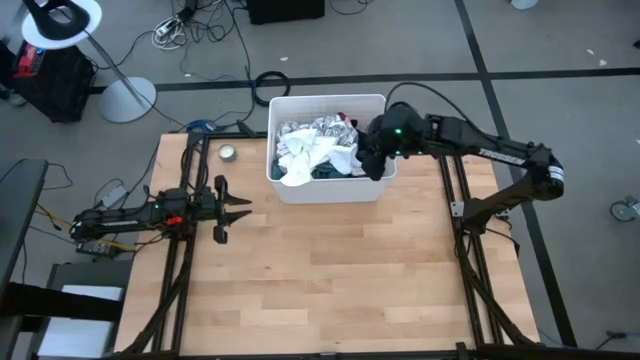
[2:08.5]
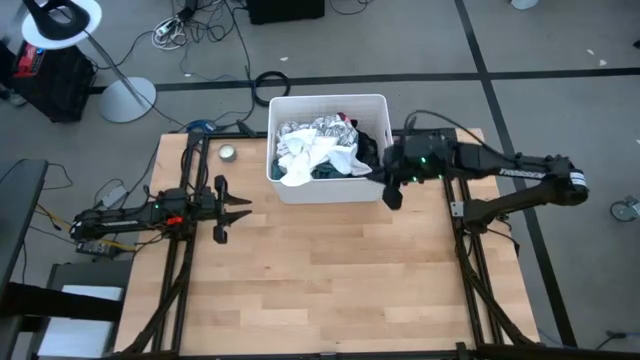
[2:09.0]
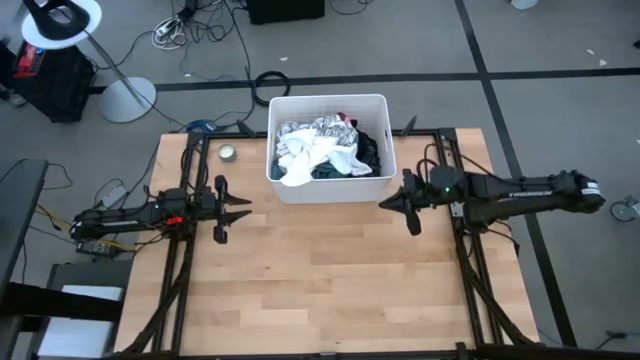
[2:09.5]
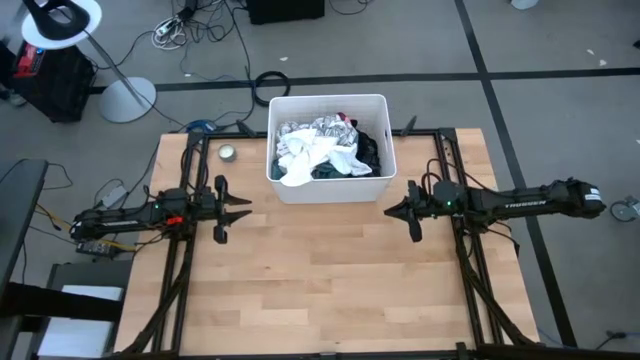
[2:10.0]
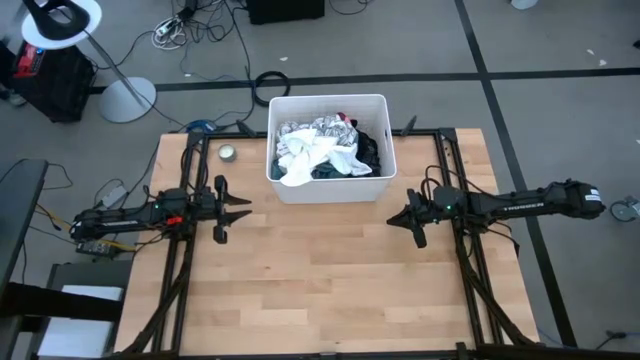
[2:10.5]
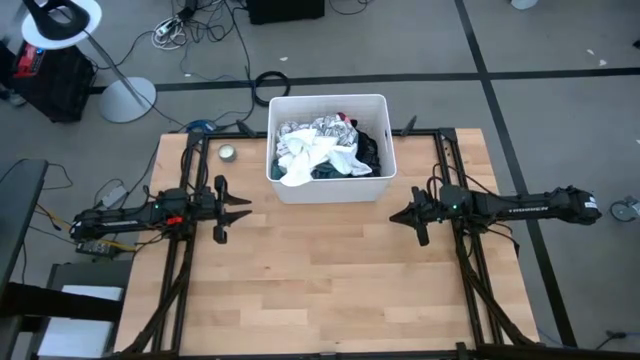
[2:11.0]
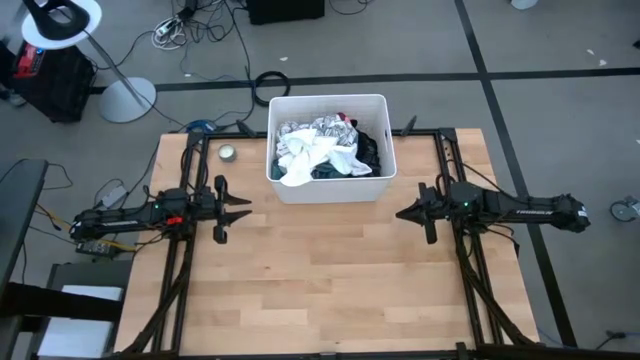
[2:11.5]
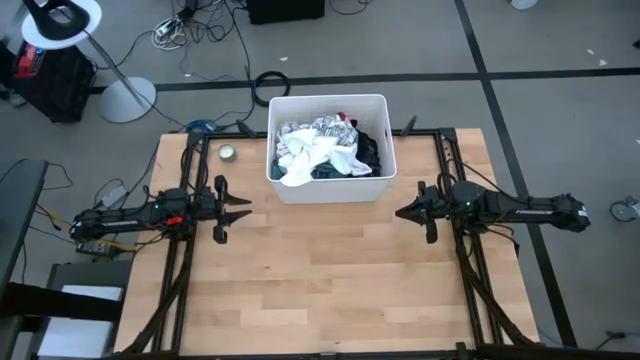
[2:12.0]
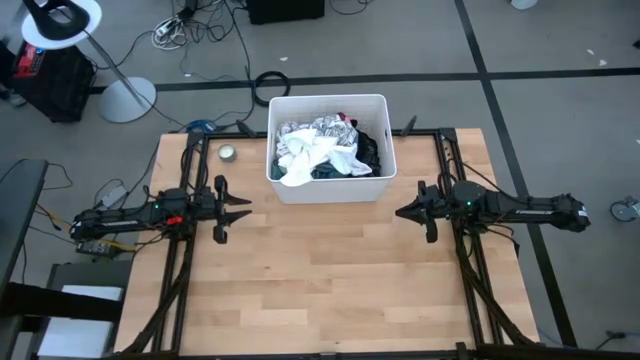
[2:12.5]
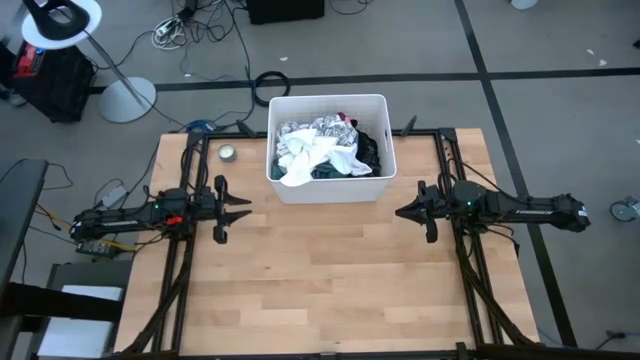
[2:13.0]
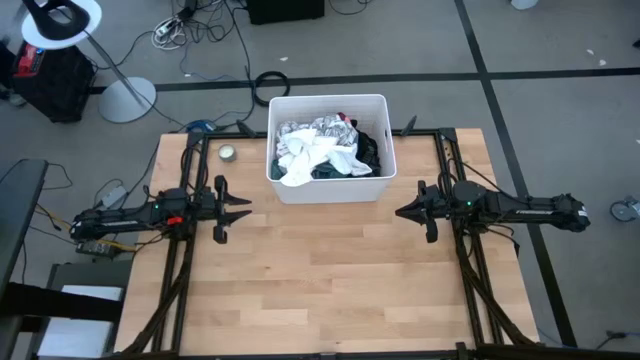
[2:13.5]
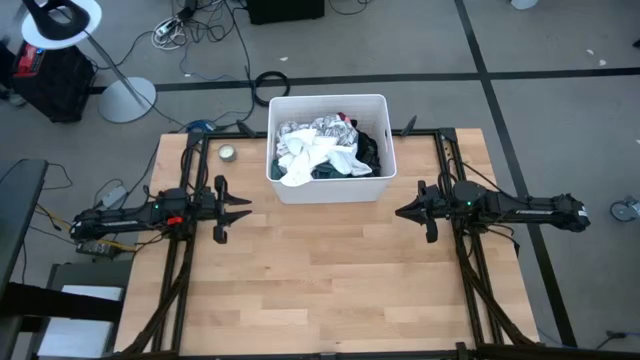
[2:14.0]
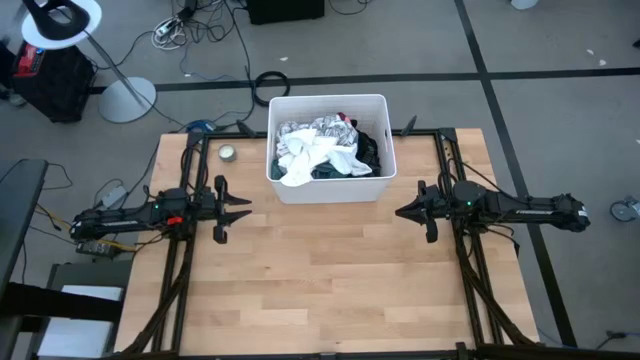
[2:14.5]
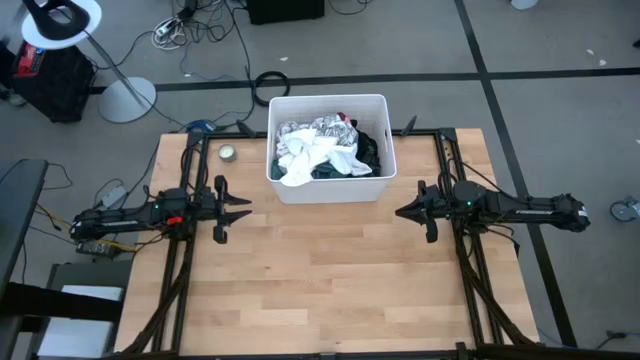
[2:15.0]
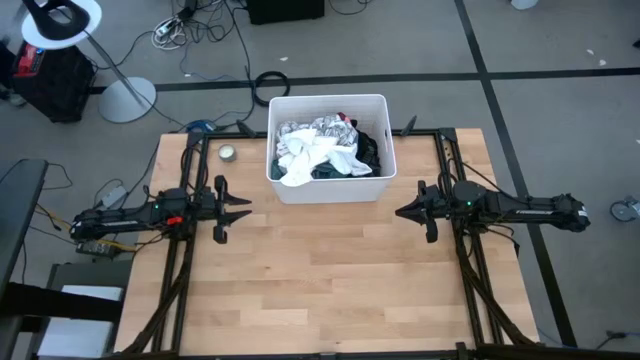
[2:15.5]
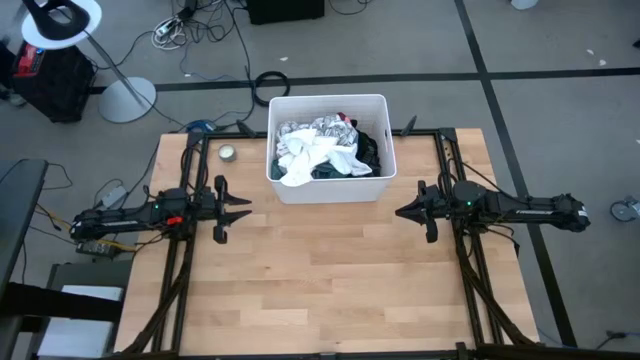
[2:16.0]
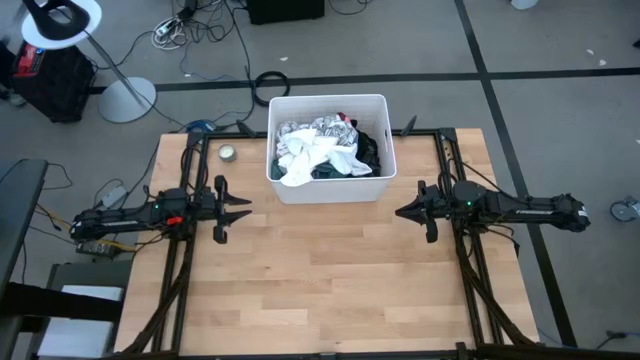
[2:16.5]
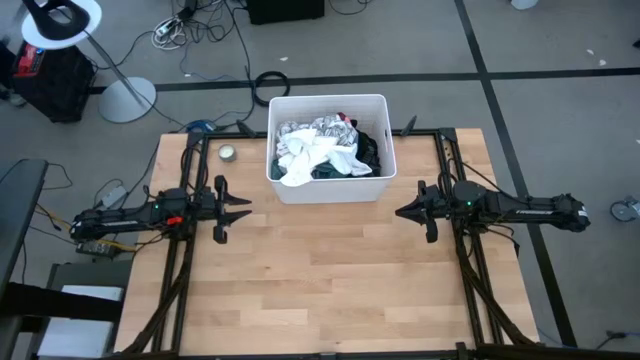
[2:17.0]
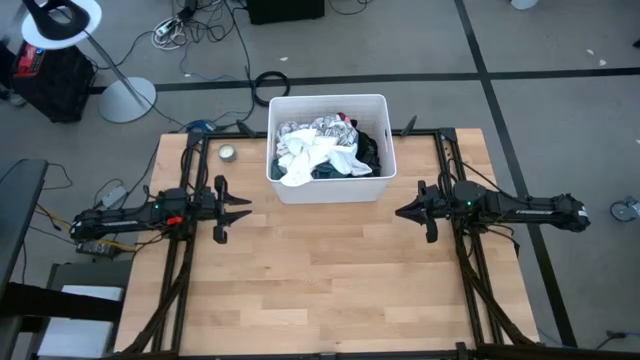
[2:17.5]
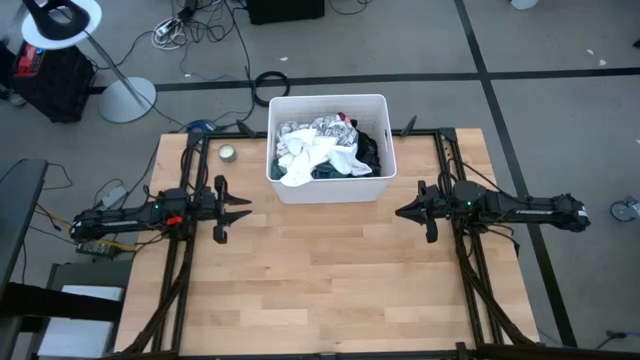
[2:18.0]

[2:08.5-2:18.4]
Task: Sort clothes
Return to Home Position

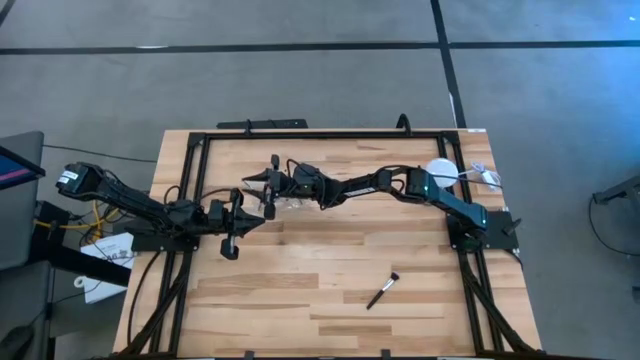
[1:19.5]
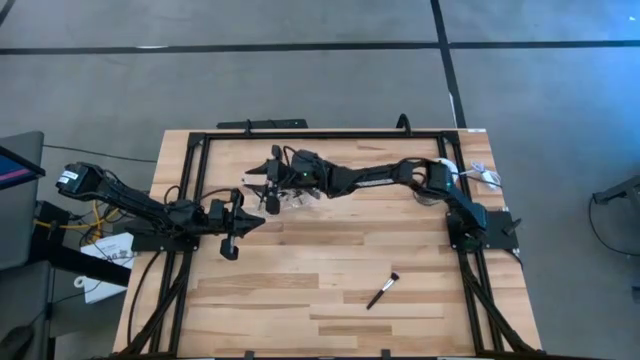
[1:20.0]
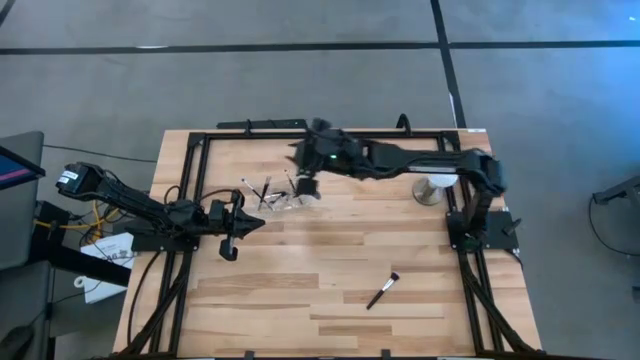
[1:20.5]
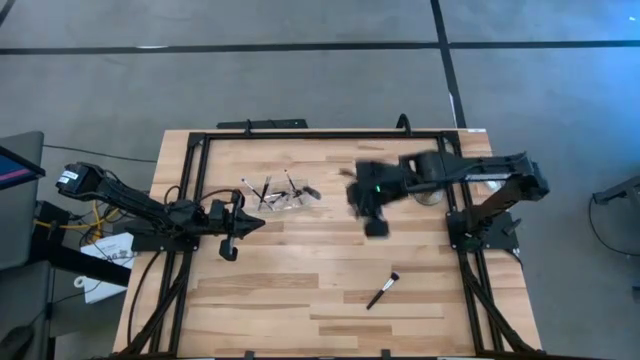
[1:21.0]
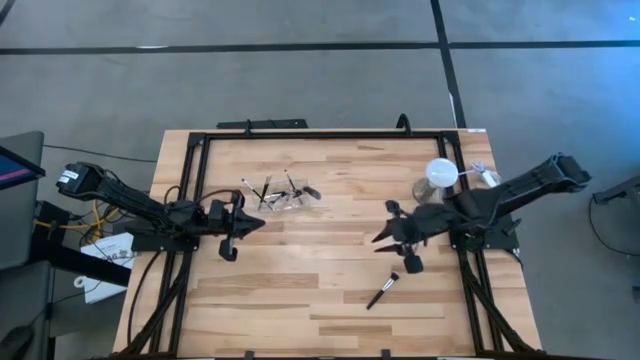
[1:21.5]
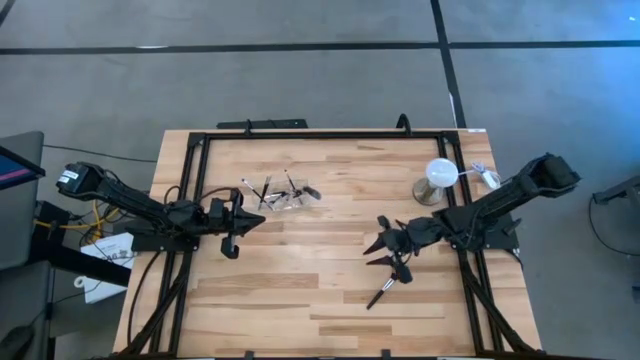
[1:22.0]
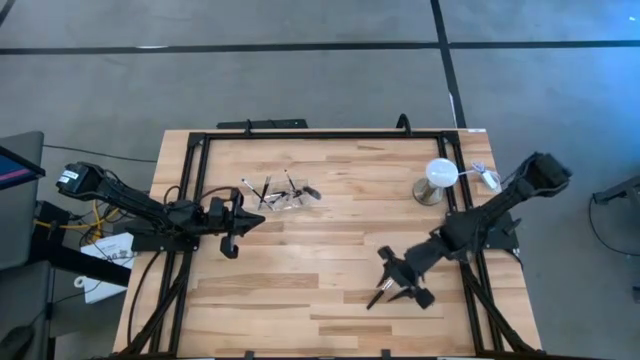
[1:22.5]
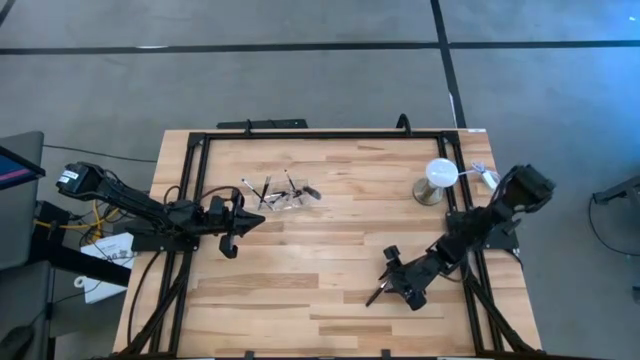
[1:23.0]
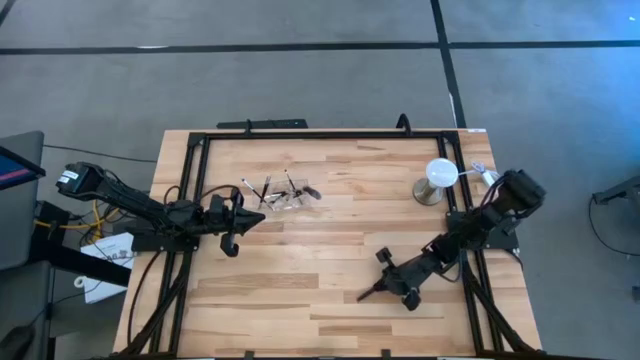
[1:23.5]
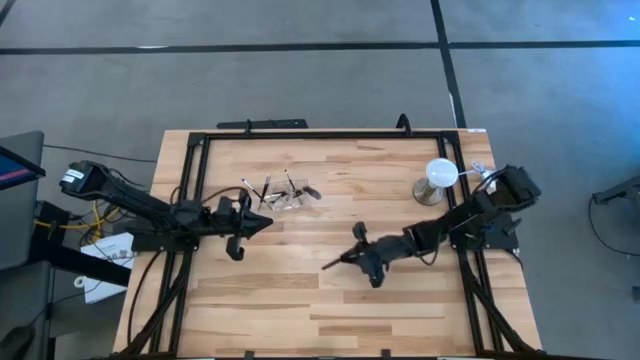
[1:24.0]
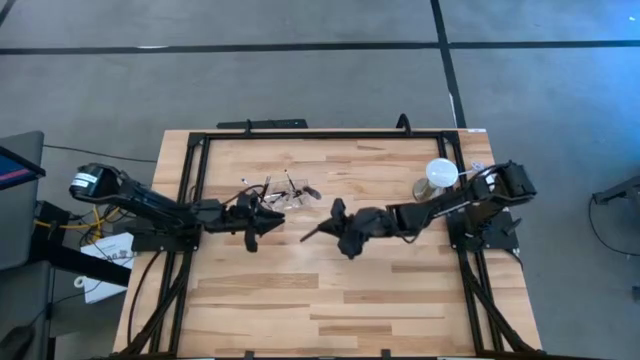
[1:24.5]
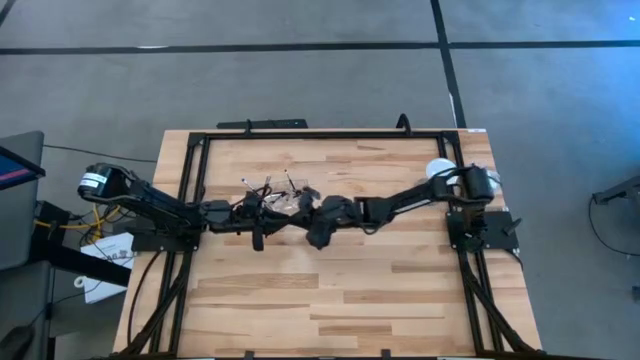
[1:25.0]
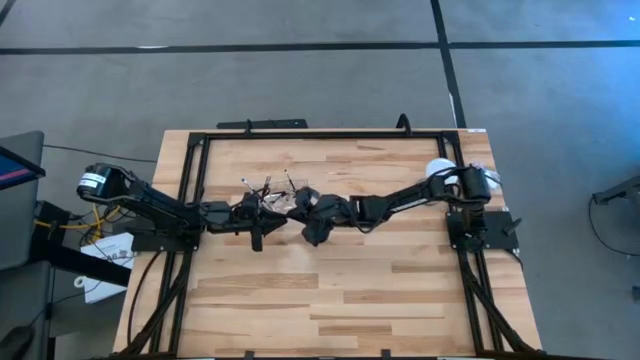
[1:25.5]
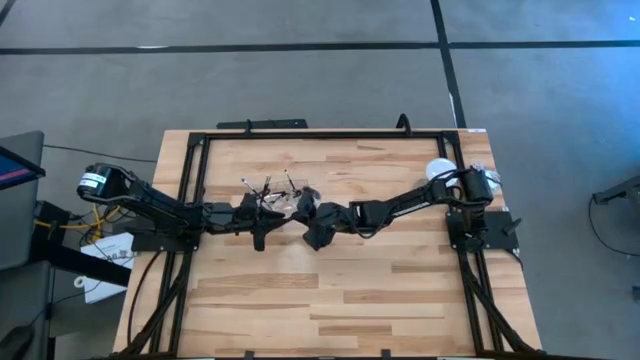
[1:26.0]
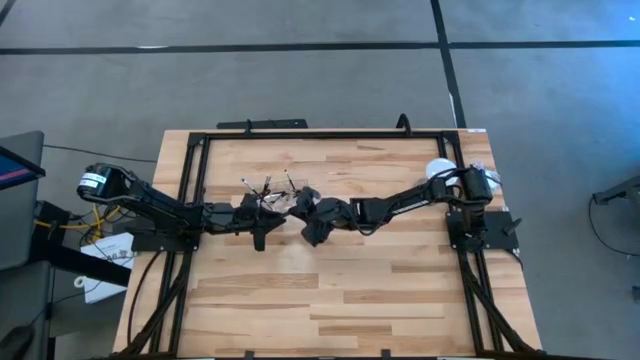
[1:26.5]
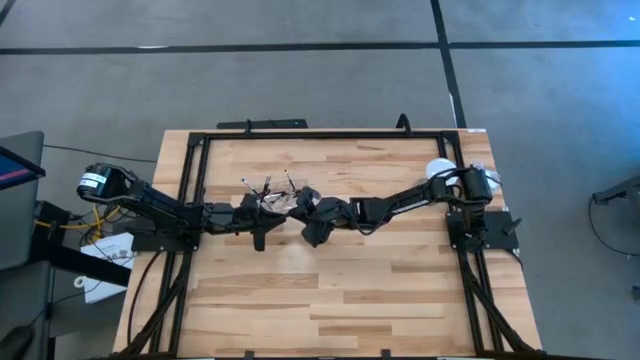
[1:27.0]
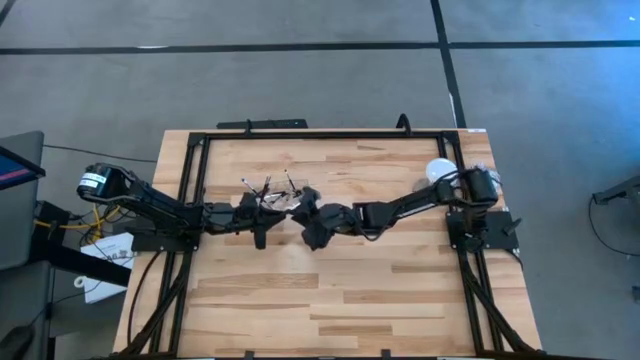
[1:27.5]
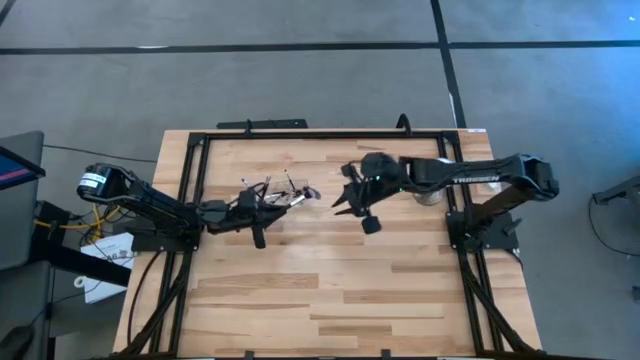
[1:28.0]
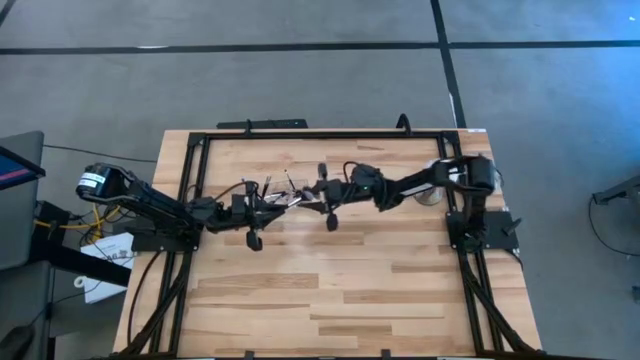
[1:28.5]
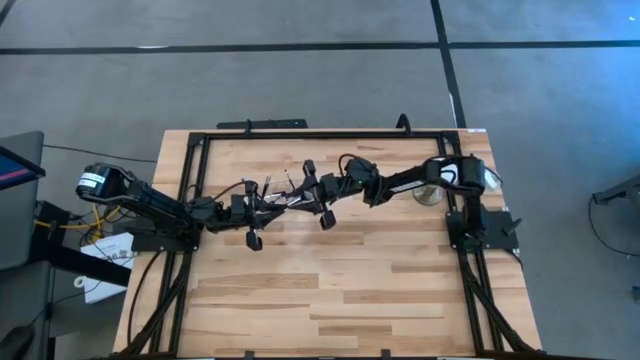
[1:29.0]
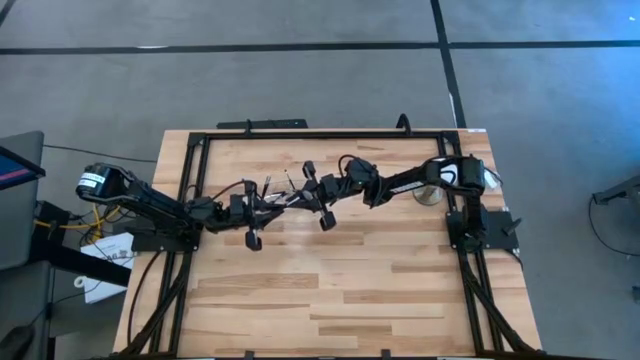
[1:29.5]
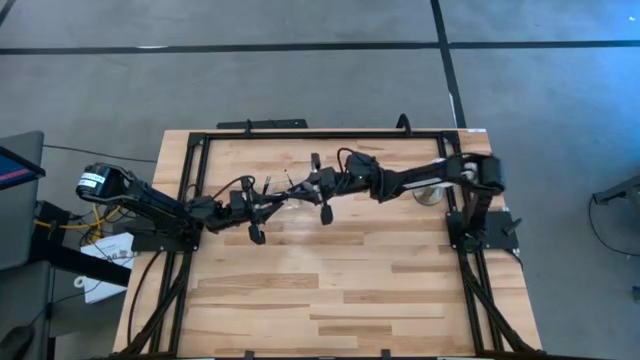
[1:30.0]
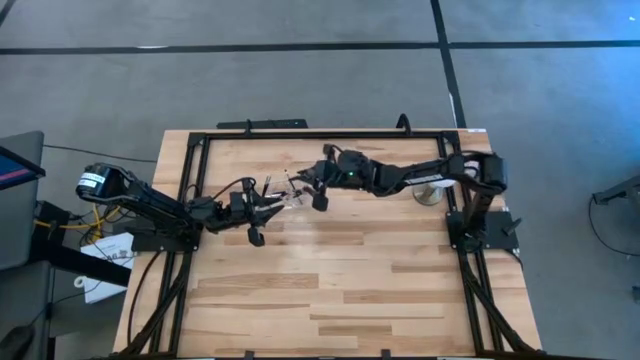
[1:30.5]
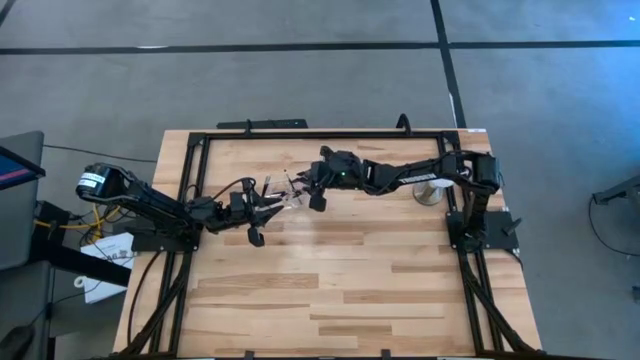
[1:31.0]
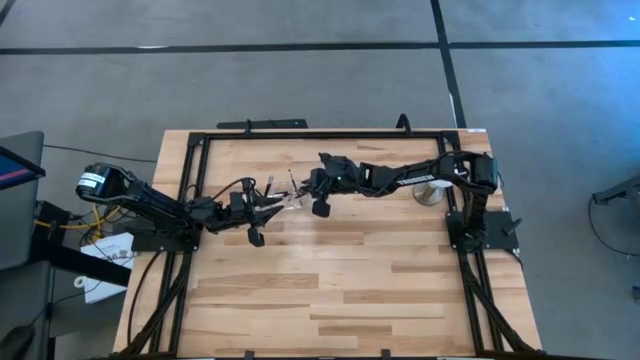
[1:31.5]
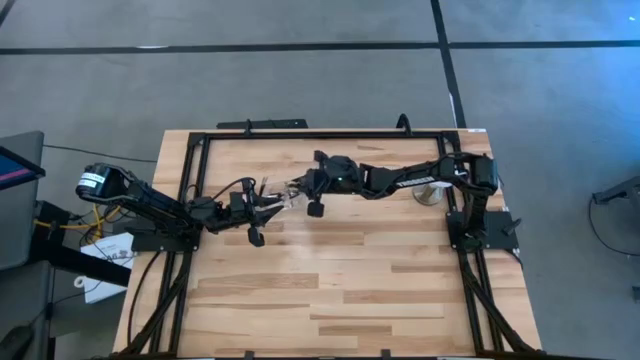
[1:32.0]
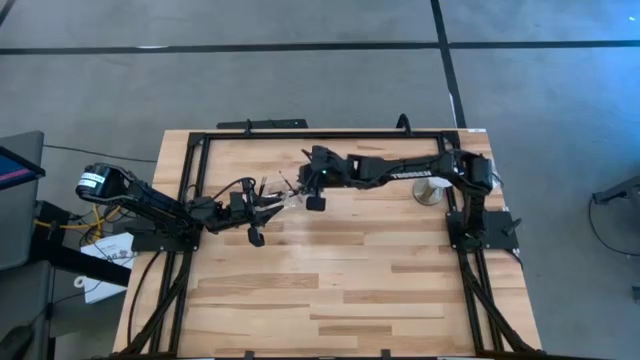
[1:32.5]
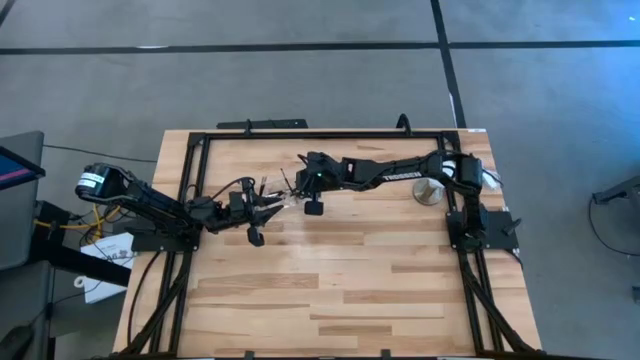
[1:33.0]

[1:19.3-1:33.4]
Task: Put items in baskets/containers
Put the blush brush into the transparent organizer
